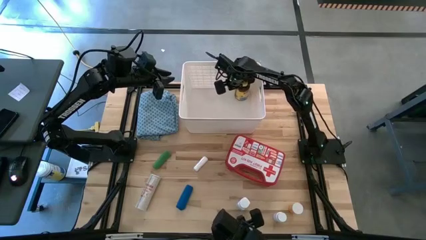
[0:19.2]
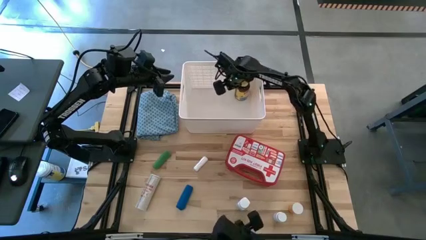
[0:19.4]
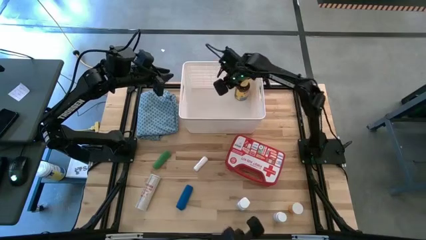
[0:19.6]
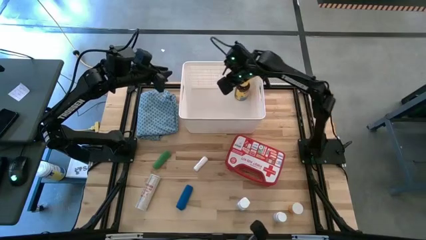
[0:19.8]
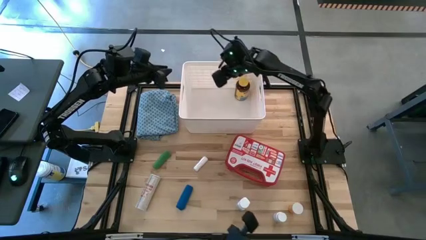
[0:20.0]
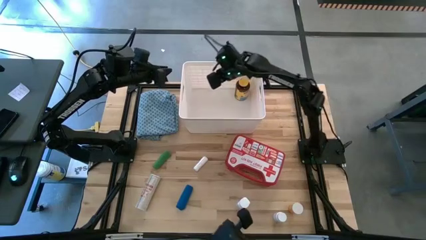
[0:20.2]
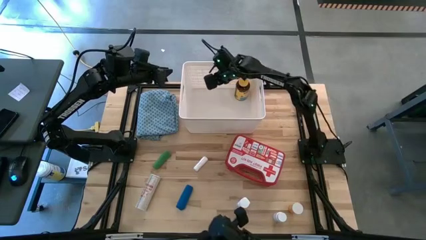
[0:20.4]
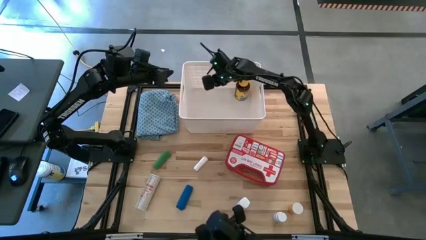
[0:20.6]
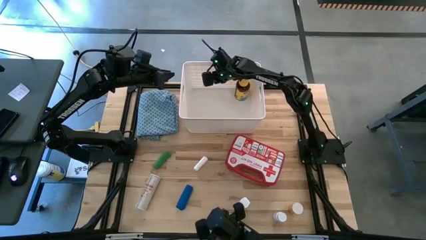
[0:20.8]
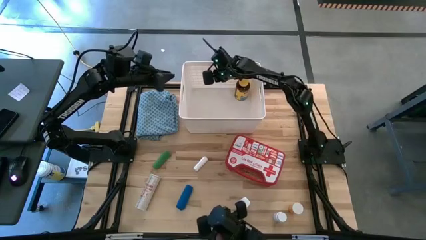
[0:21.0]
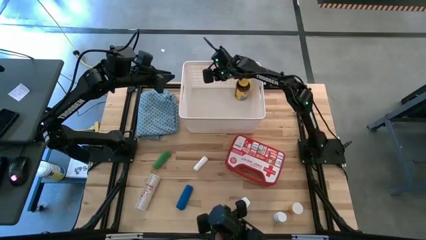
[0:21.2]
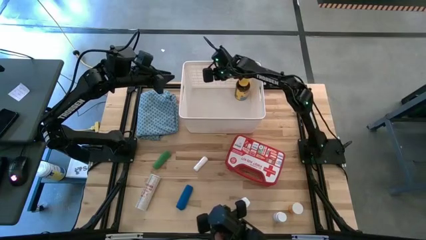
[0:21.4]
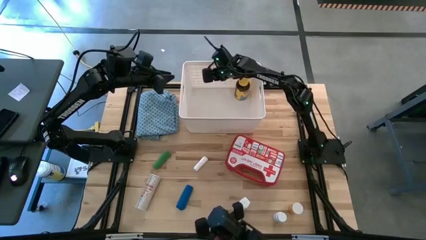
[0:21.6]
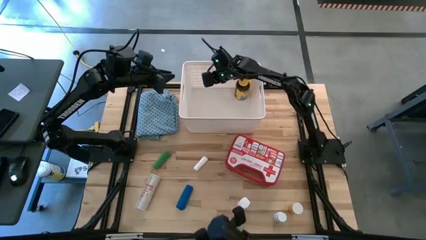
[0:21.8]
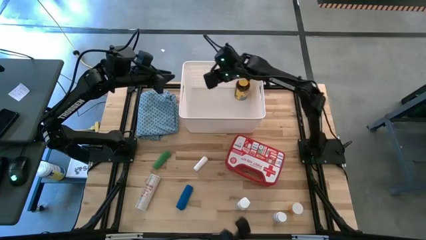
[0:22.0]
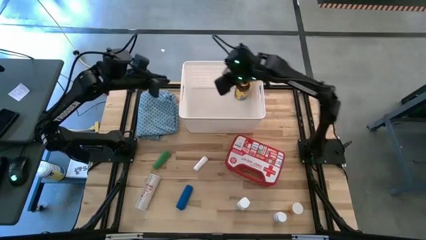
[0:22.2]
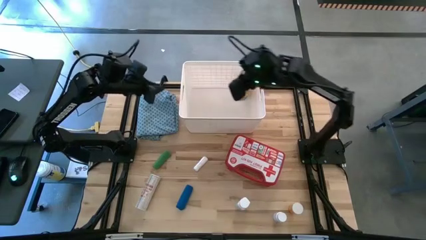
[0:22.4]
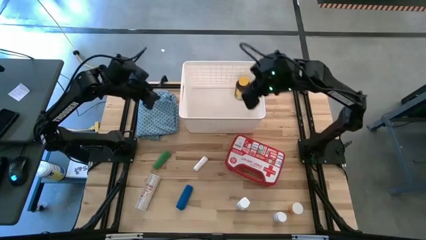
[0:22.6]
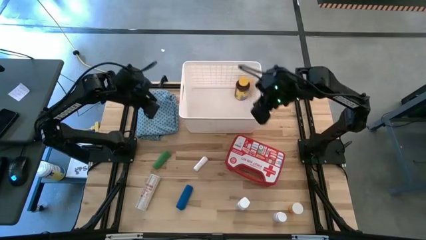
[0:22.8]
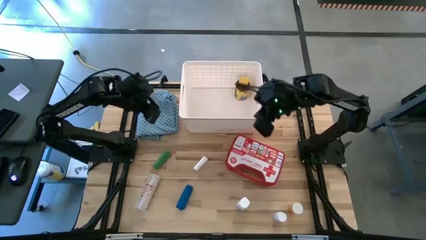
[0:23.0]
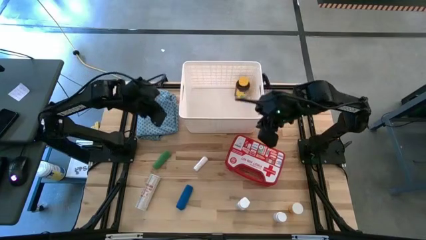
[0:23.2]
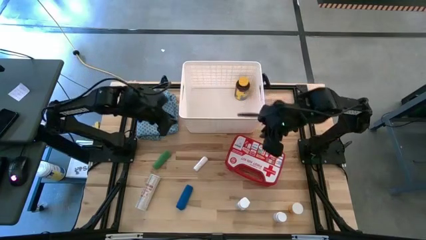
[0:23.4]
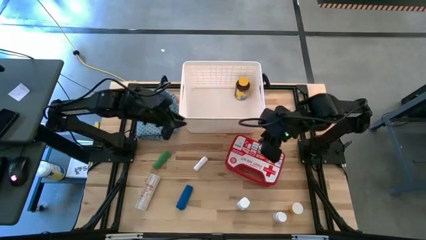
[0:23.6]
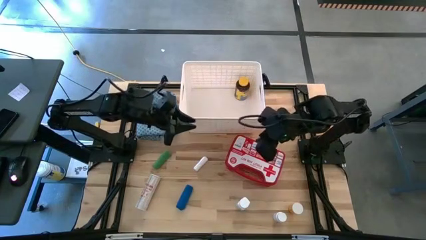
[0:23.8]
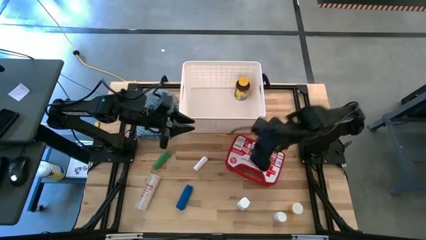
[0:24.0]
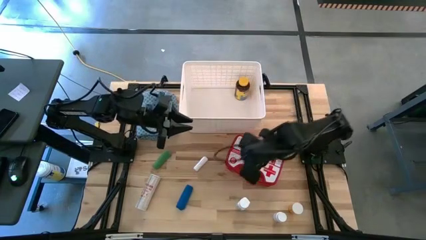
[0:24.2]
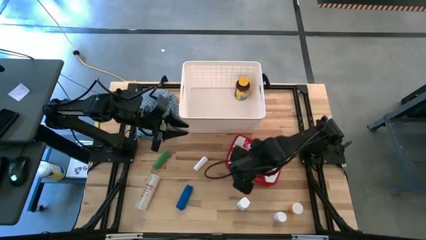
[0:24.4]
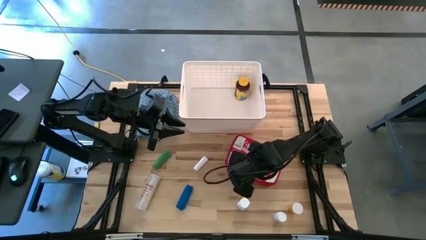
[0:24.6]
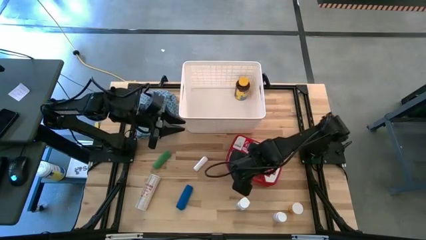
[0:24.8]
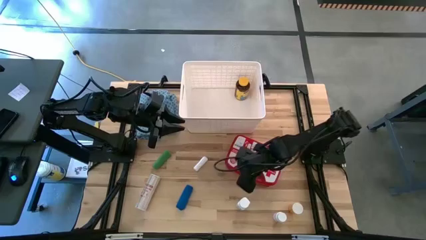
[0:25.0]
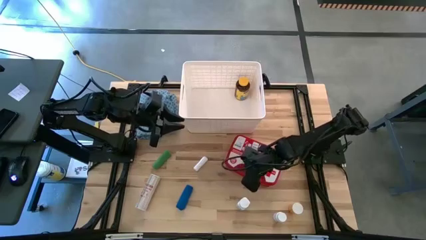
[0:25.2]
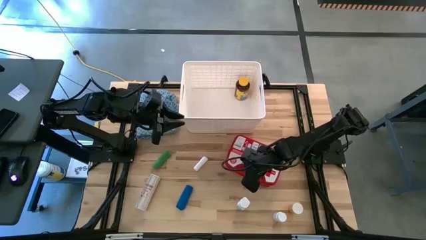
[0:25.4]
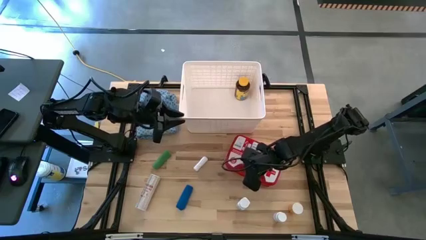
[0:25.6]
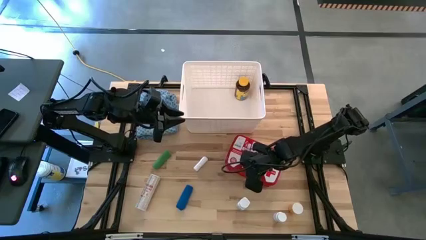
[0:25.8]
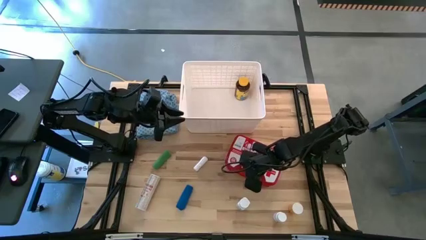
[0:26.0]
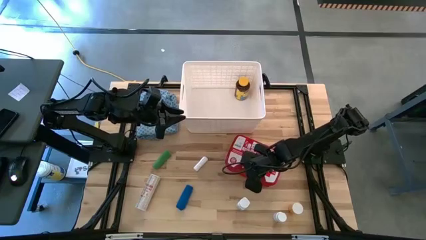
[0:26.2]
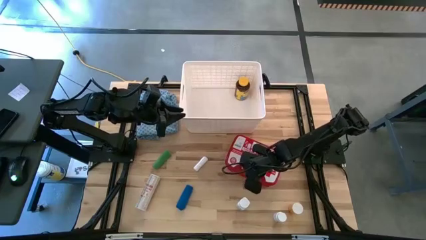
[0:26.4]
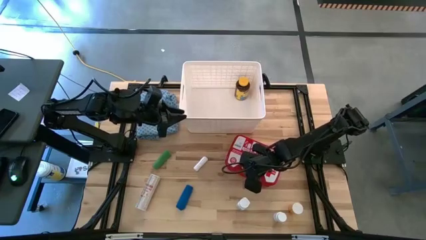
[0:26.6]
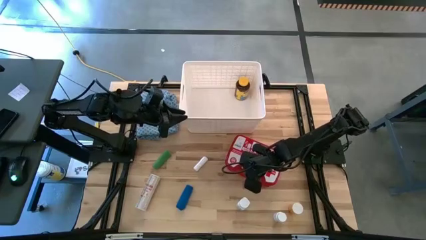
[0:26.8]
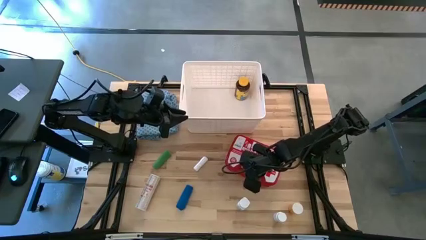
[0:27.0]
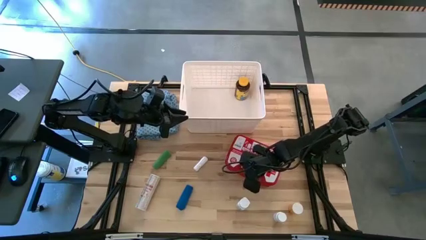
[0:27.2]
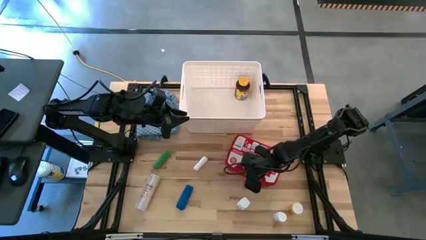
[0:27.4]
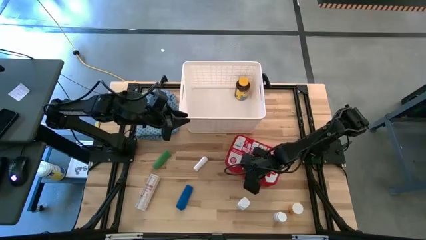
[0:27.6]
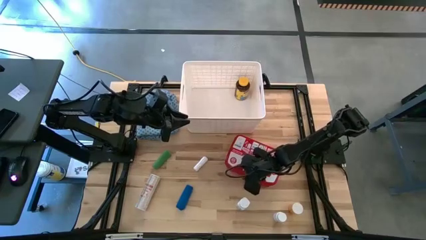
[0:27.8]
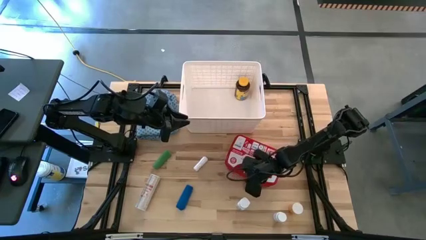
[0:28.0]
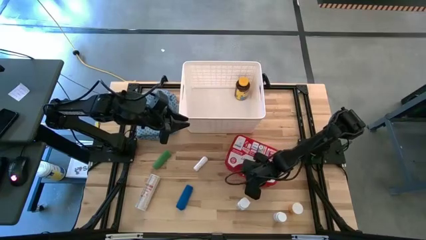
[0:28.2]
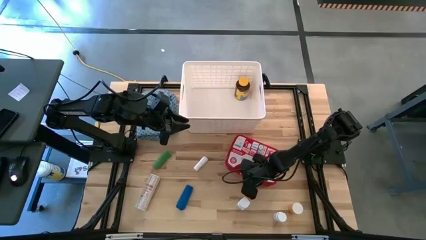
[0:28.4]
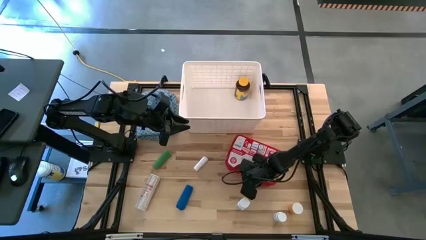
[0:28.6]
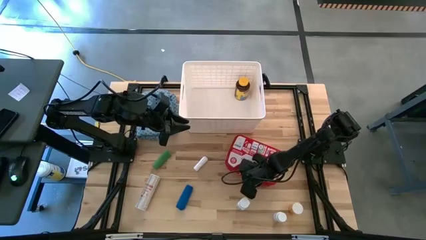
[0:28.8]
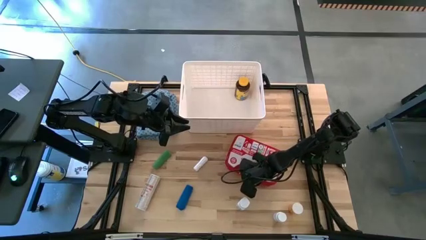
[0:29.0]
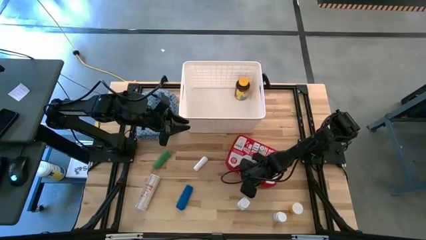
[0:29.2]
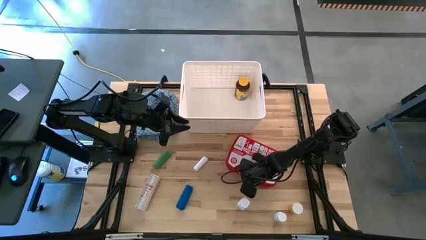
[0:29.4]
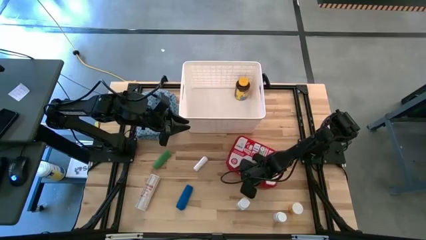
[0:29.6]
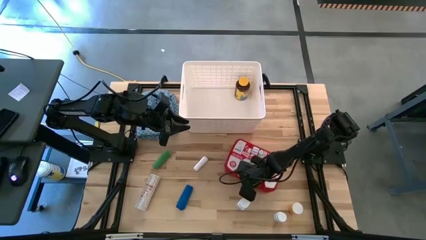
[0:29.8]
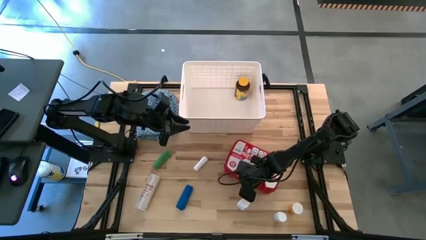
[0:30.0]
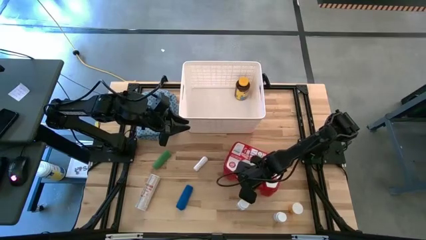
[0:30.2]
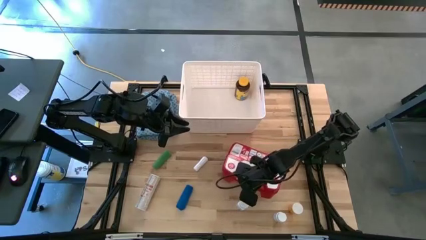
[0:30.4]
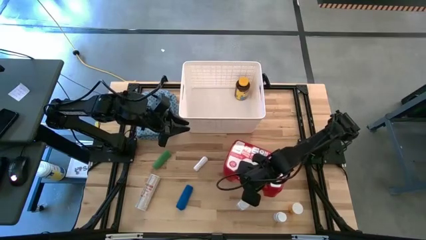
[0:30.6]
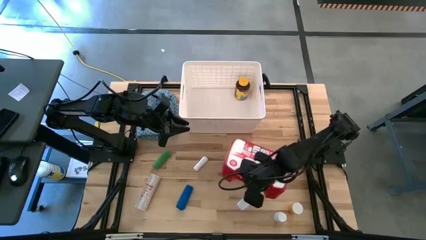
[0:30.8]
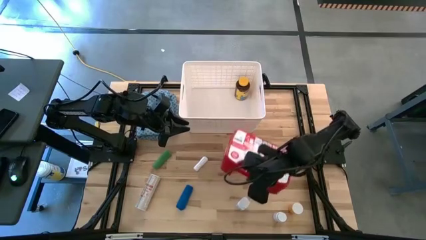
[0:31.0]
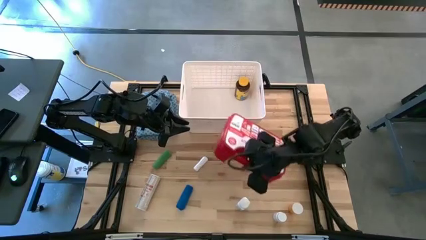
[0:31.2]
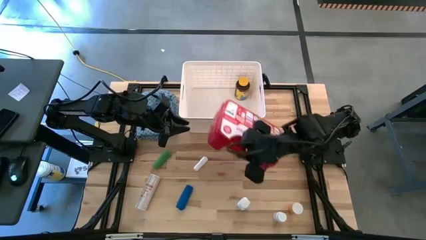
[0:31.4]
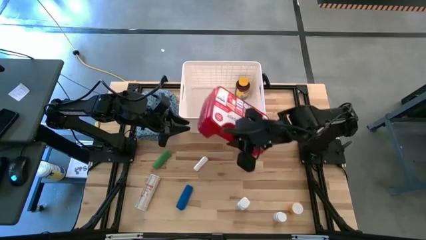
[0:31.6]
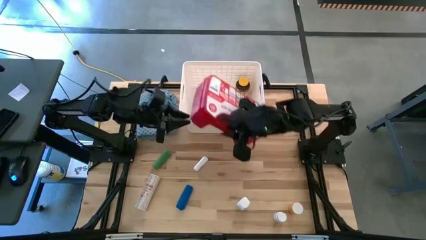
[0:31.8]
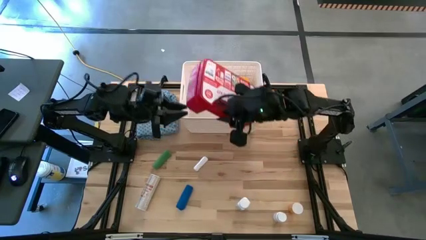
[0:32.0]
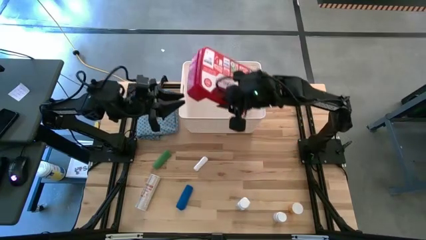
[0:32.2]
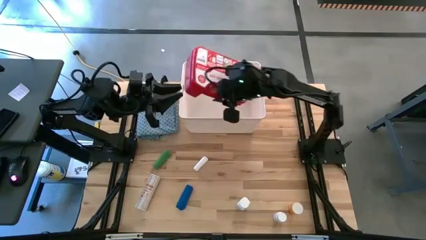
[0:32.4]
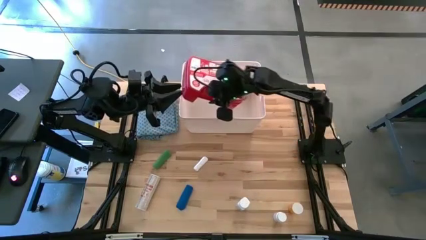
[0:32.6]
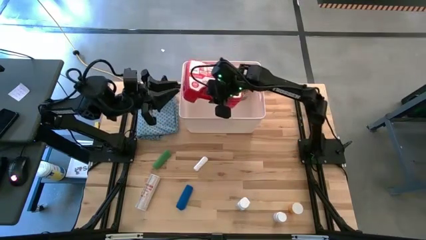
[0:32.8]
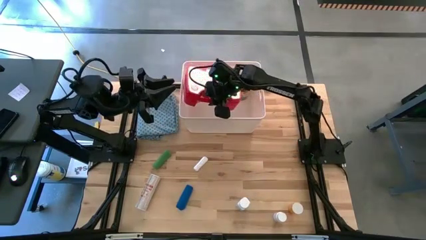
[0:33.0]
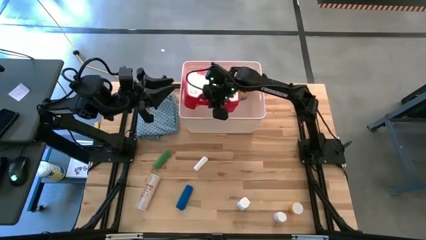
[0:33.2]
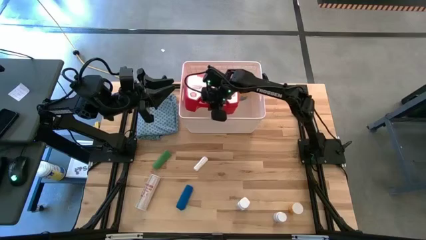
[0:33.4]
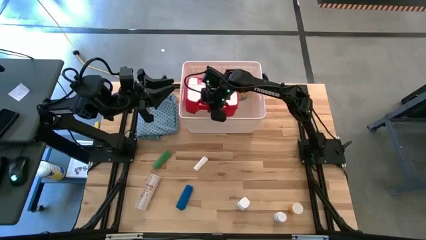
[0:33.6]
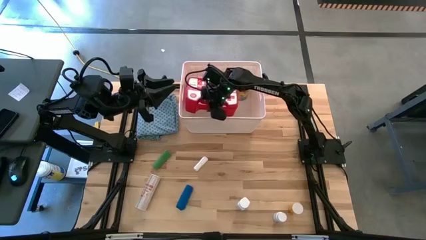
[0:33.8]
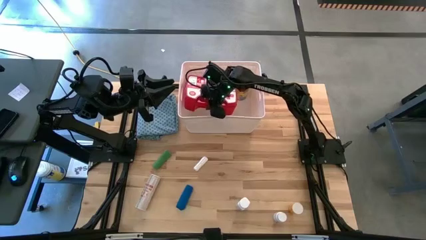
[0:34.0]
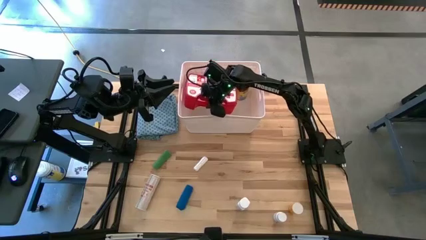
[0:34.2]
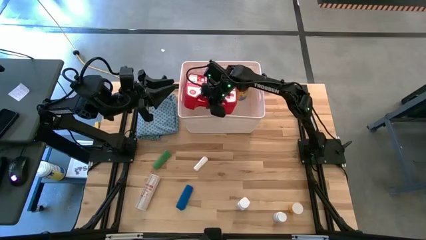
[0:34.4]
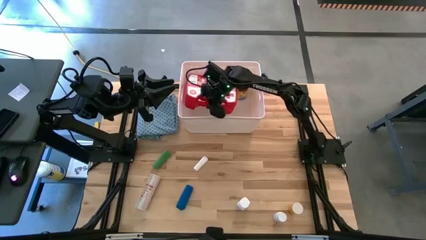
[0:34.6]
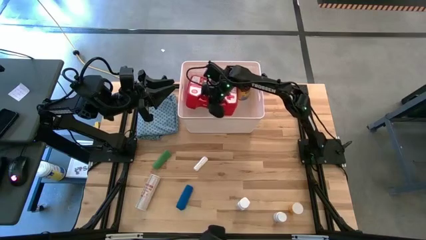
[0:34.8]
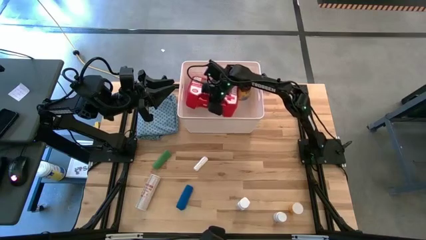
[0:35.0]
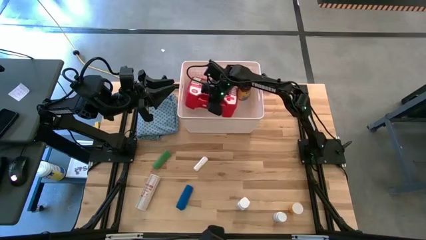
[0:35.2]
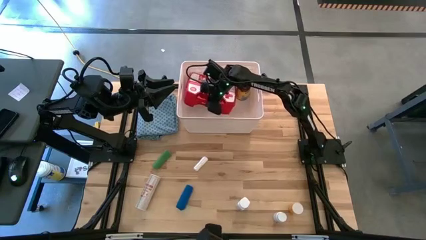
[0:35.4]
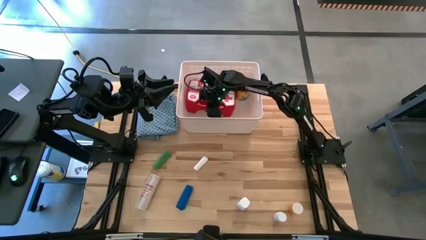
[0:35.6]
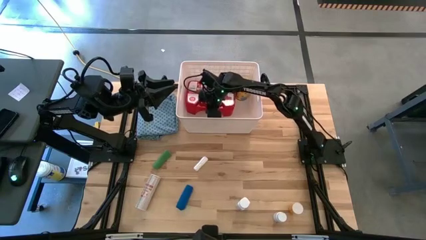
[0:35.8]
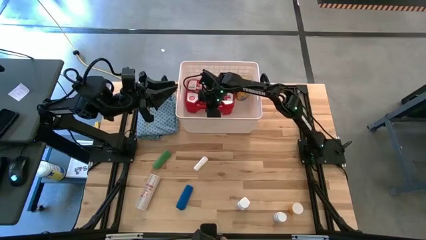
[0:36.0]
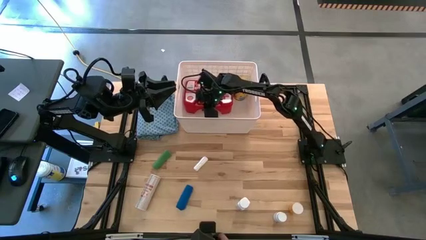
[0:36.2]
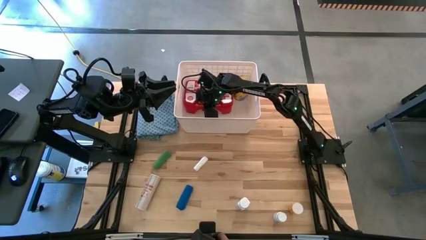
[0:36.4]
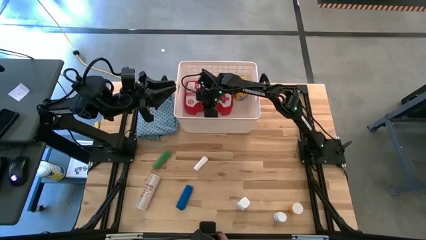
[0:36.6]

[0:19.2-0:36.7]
Task: Pick & place medical supplies in basket/bin
Put the red first aid kit into the white bin
